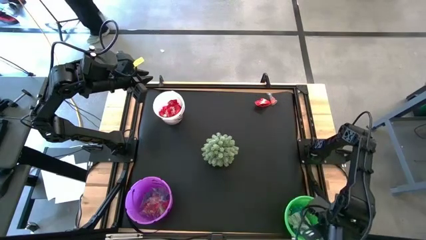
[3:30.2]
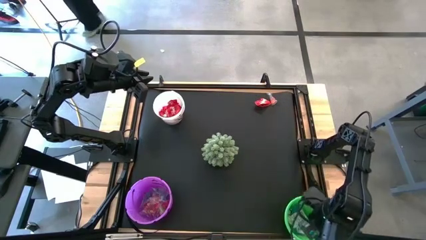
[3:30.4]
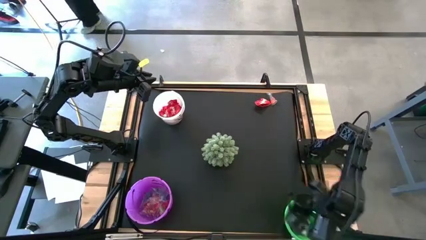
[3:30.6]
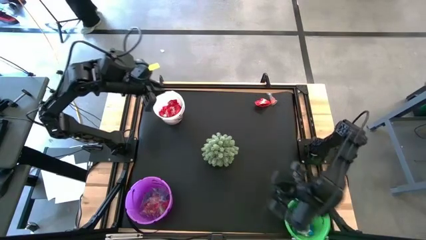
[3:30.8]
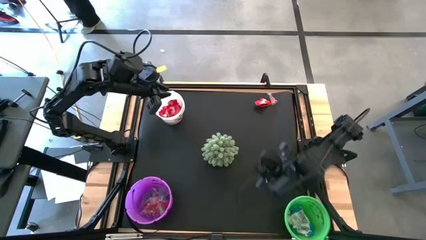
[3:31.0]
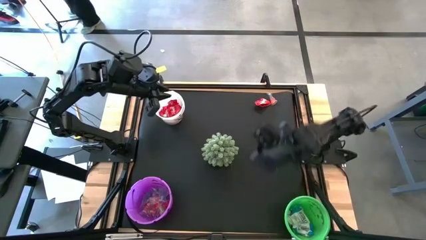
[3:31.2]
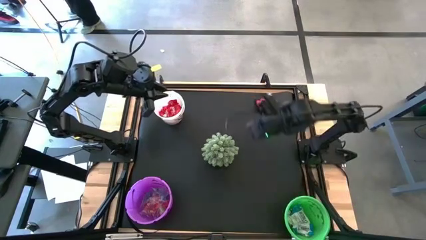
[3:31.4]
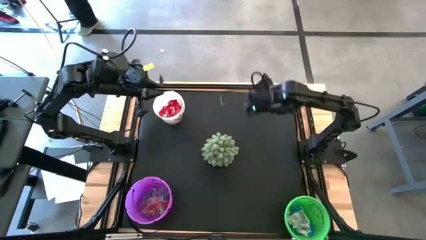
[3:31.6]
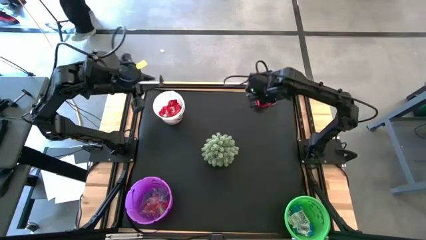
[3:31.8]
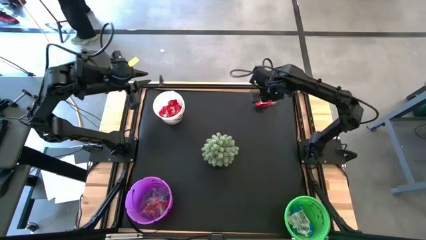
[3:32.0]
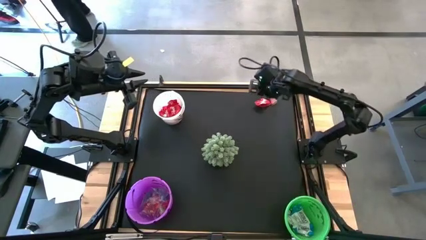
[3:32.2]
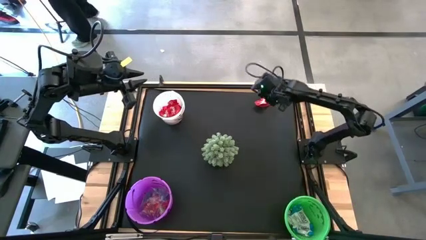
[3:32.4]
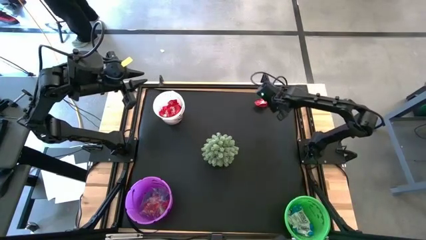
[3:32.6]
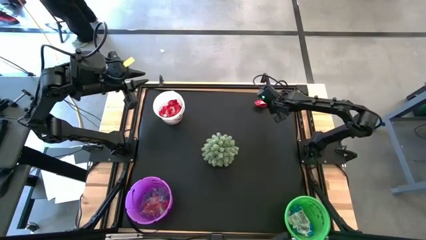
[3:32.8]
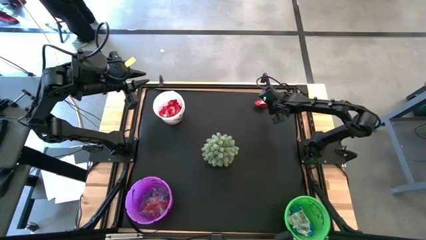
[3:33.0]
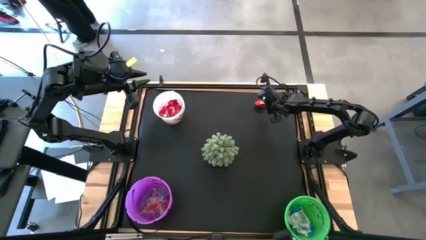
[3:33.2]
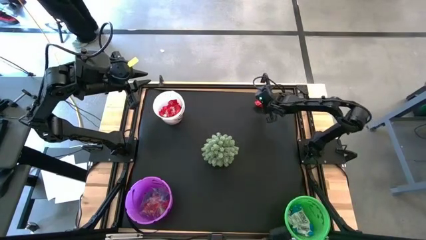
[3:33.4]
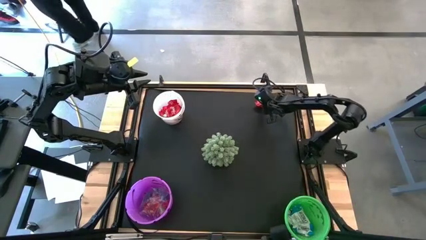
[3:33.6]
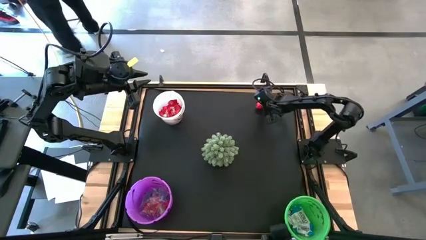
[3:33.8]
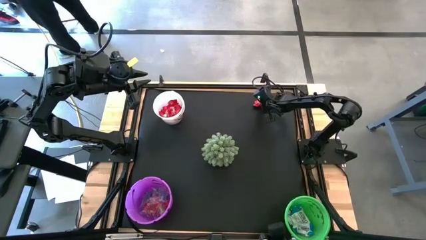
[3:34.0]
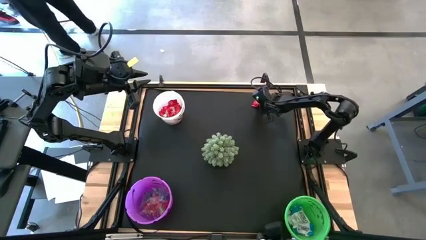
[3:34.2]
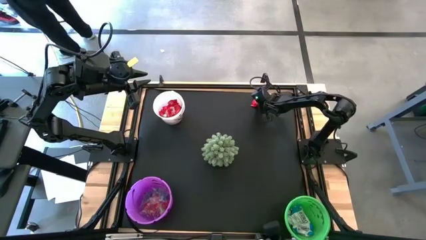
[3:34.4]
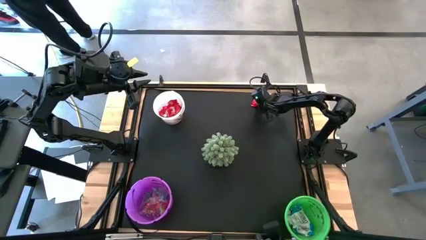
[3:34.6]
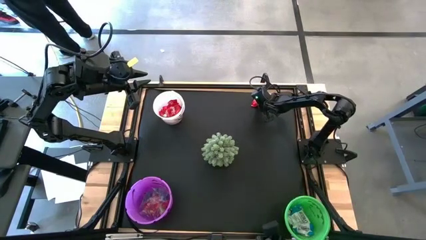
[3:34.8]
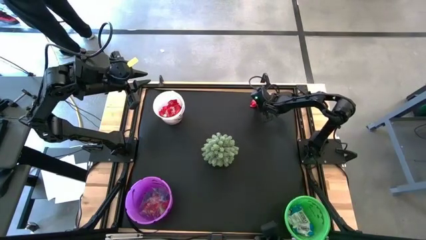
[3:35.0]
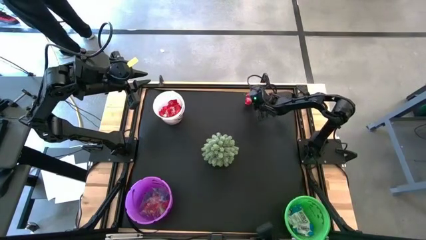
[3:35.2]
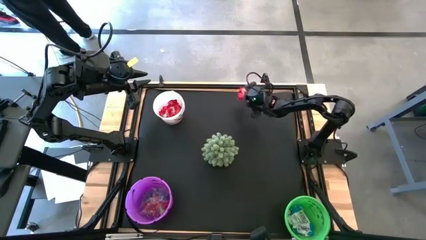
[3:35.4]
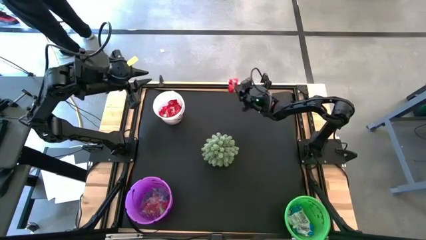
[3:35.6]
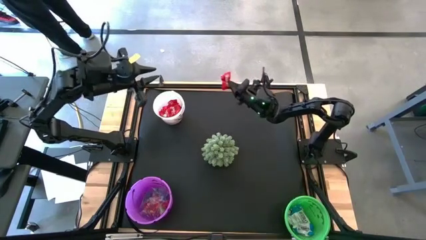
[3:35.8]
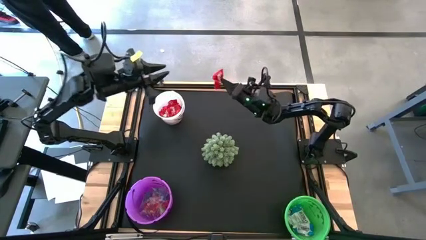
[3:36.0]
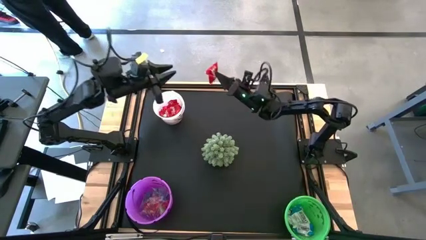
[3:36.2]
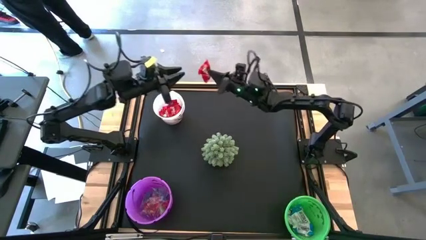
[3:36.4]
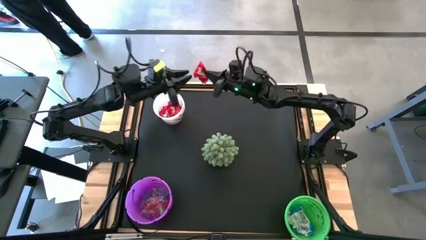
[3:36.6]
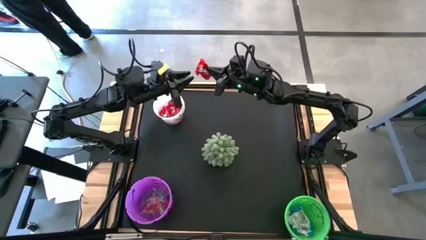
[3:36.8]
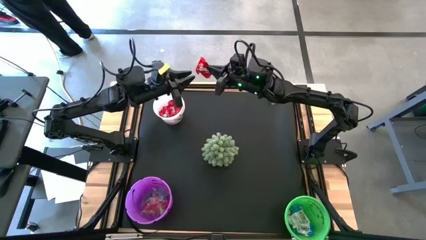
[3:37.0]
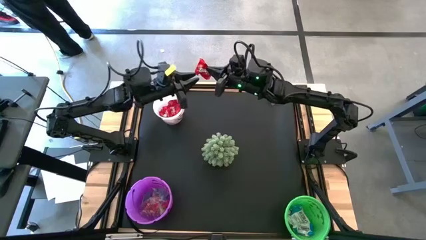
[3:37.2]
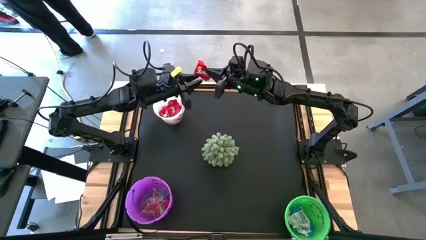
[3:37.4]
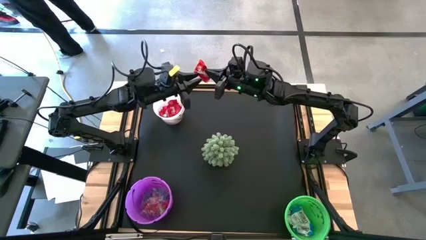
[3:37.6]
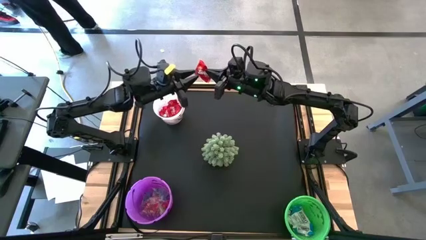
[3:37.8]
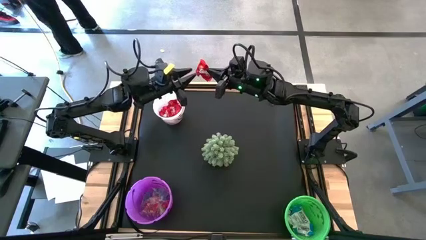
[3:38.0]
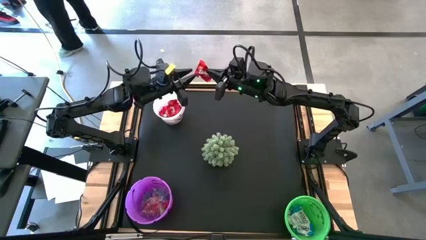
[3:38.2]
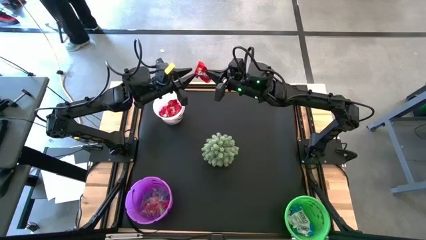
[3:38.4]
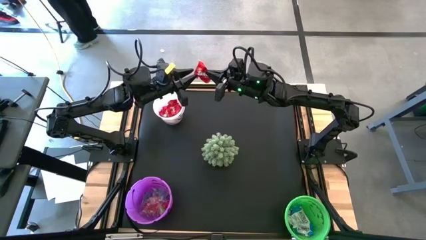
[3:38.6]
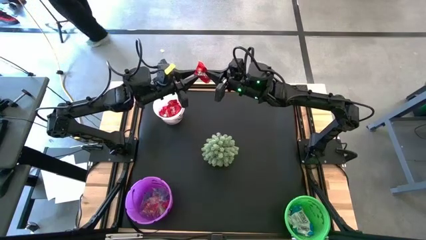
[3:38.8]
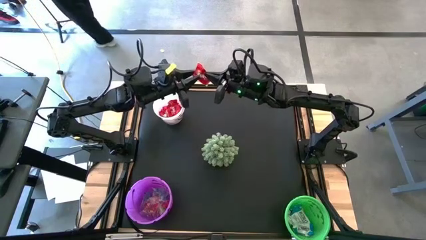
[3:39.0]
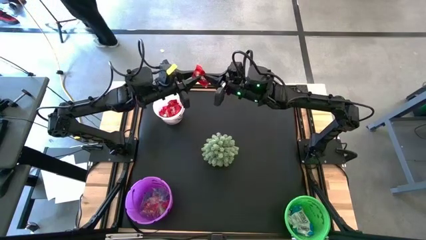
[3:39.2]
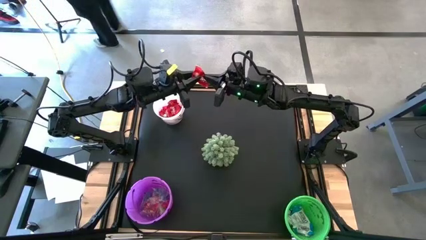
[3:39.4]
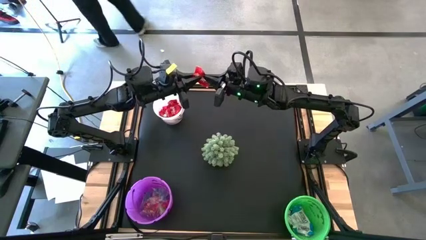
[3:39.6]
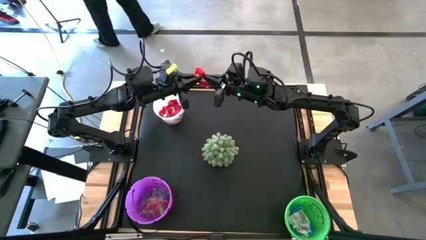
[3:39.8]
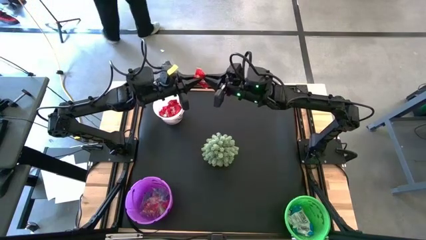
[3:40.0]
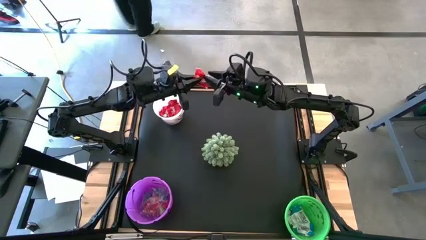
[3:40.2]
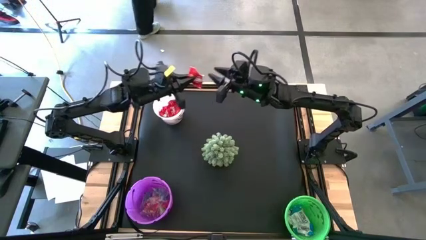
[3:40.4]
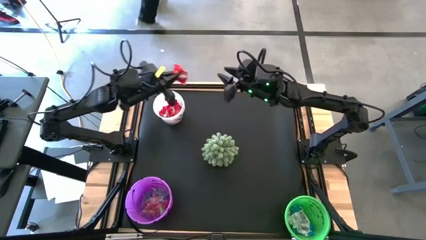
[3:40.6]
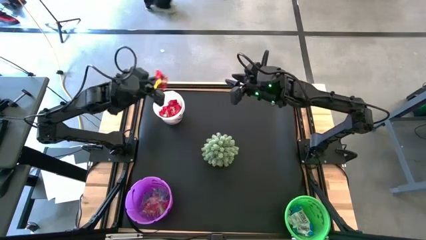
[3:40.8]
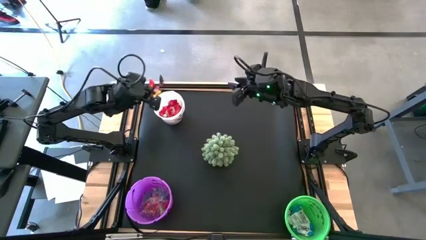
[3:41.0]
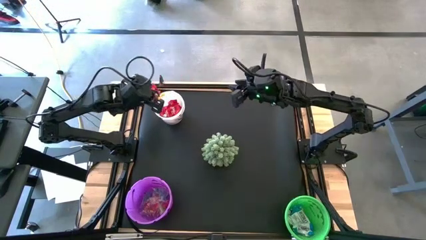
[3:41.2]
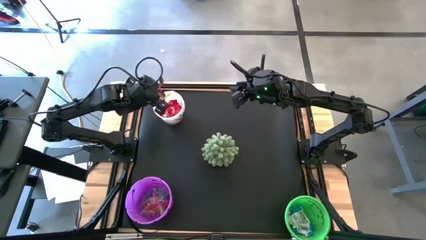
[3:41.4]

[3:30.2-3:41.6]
Task: Organize candy in baskets
Put the red candy into the white bucket
